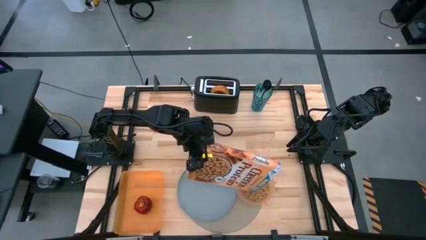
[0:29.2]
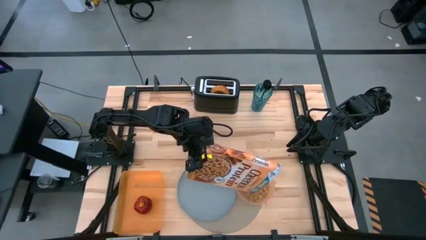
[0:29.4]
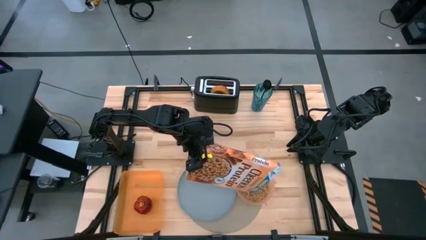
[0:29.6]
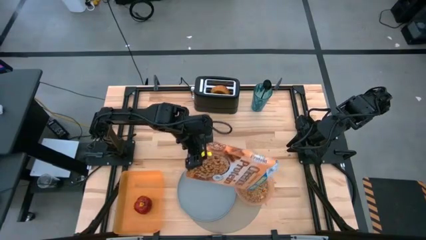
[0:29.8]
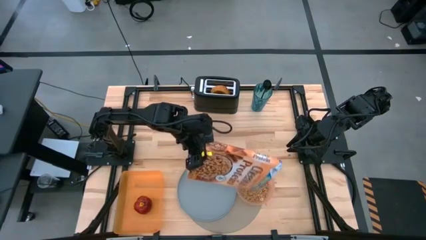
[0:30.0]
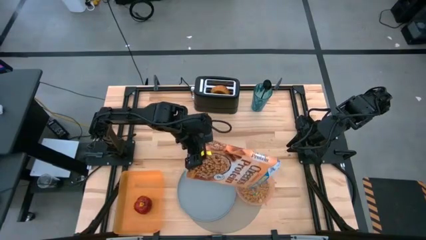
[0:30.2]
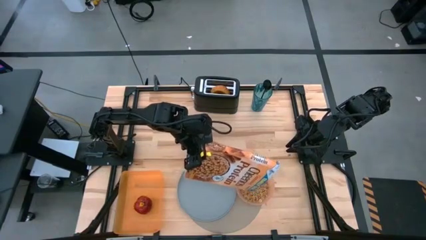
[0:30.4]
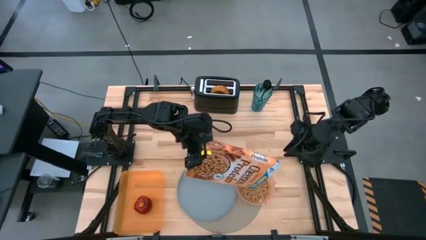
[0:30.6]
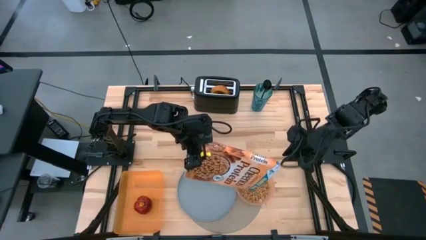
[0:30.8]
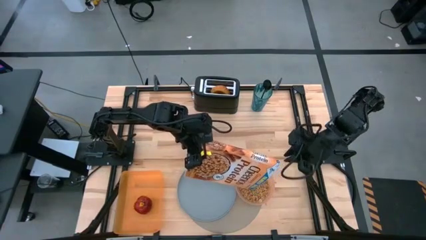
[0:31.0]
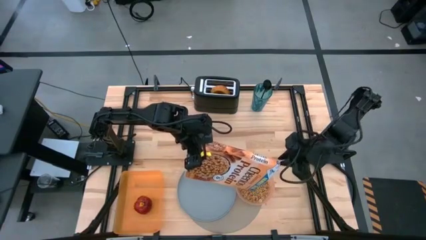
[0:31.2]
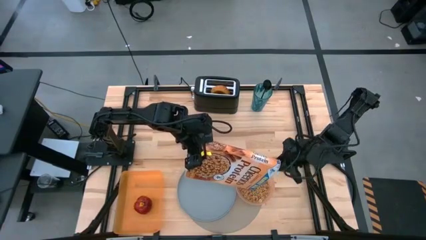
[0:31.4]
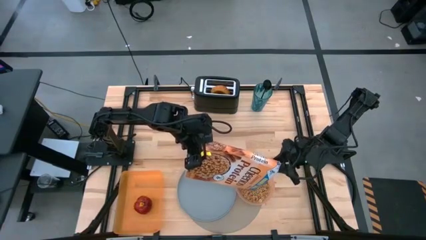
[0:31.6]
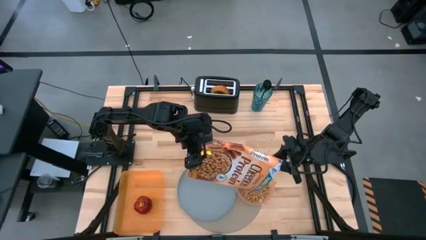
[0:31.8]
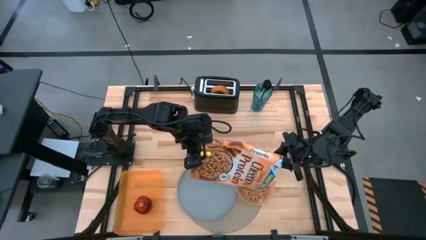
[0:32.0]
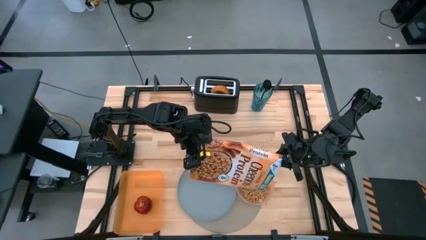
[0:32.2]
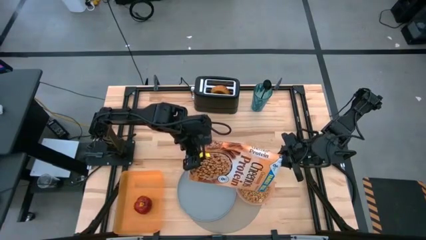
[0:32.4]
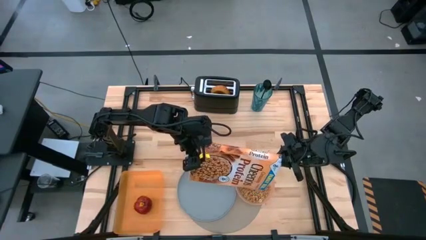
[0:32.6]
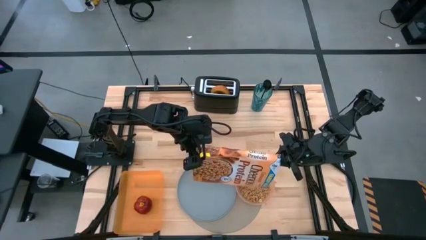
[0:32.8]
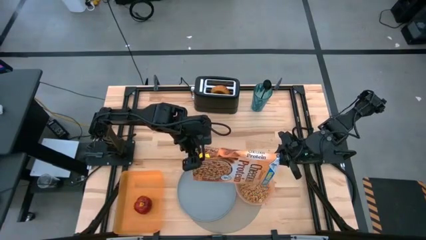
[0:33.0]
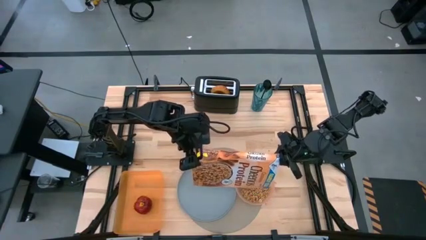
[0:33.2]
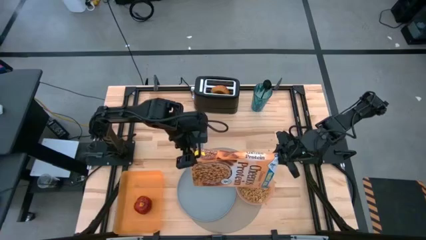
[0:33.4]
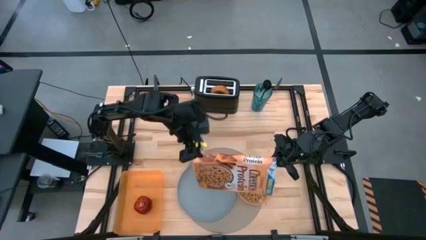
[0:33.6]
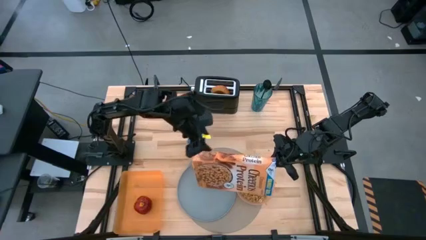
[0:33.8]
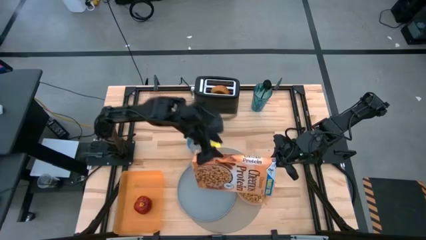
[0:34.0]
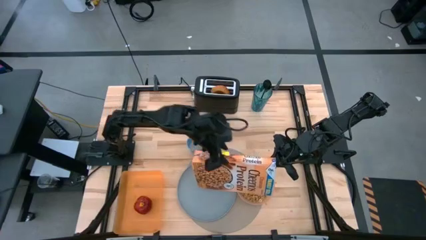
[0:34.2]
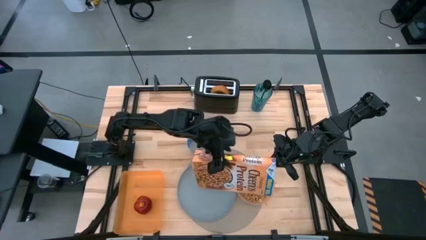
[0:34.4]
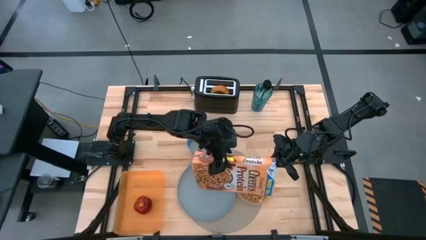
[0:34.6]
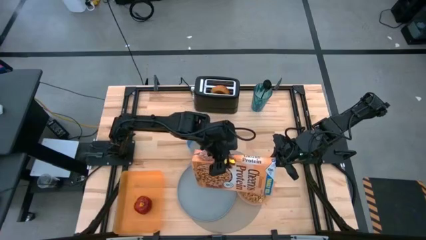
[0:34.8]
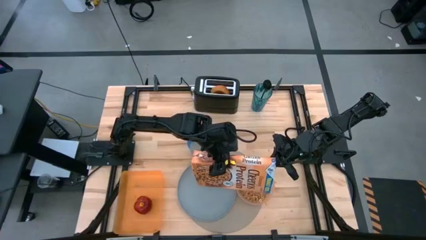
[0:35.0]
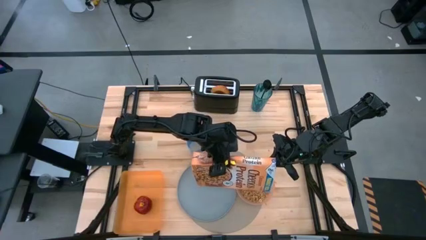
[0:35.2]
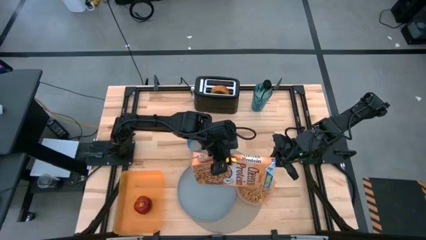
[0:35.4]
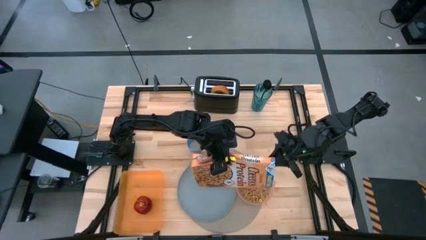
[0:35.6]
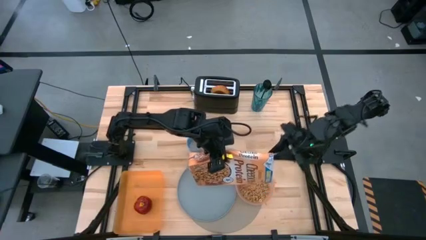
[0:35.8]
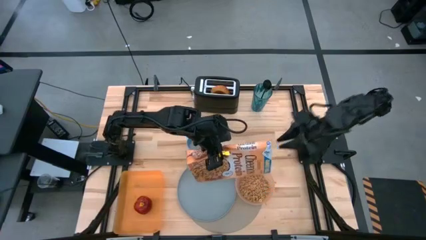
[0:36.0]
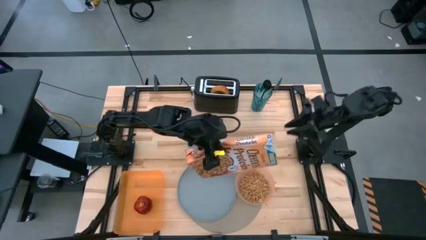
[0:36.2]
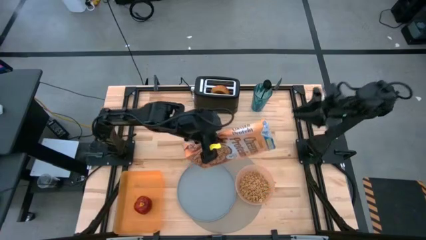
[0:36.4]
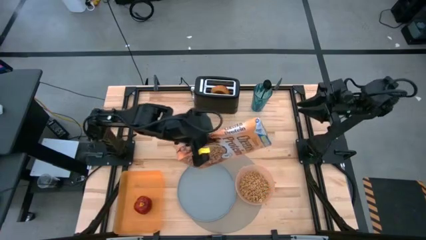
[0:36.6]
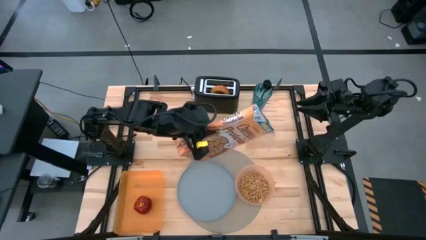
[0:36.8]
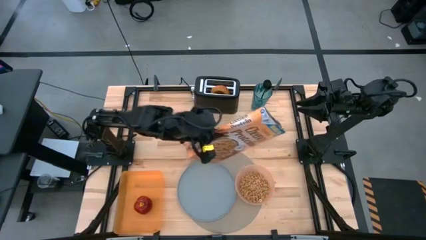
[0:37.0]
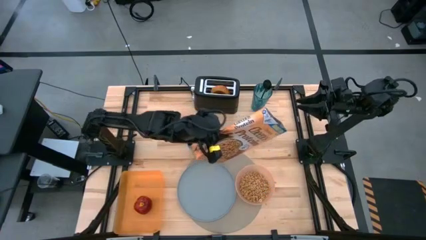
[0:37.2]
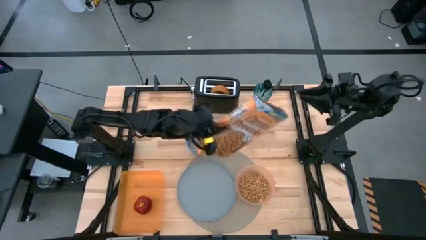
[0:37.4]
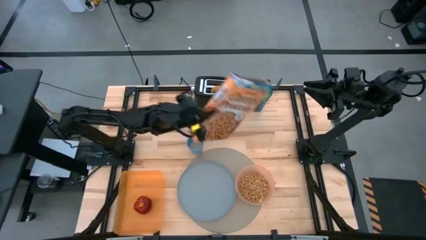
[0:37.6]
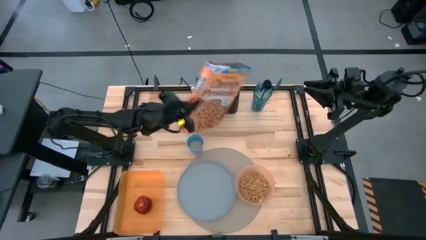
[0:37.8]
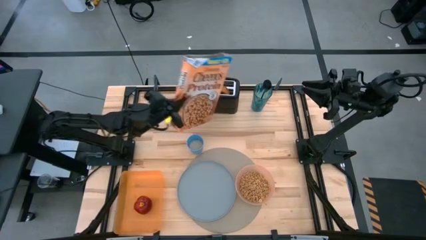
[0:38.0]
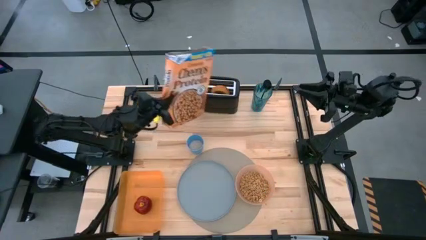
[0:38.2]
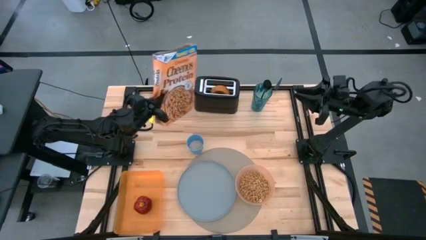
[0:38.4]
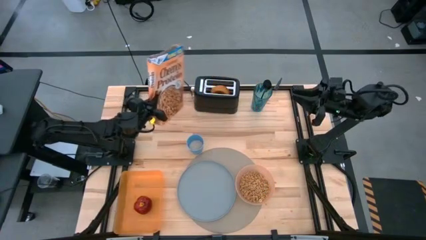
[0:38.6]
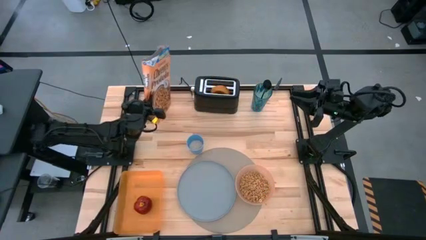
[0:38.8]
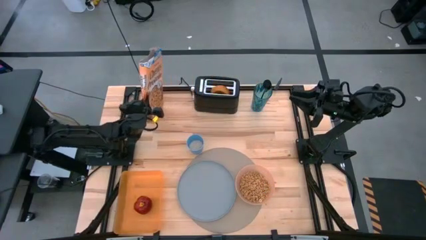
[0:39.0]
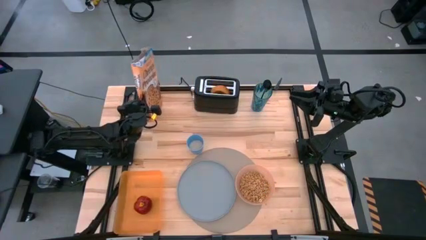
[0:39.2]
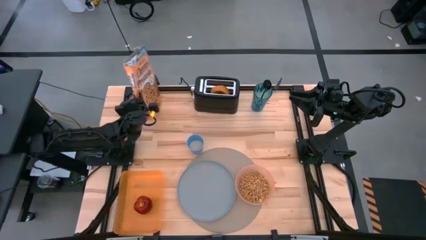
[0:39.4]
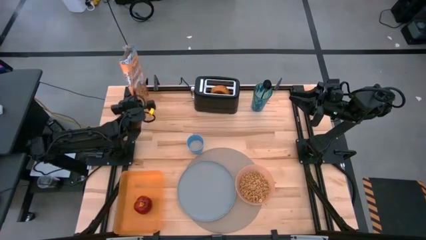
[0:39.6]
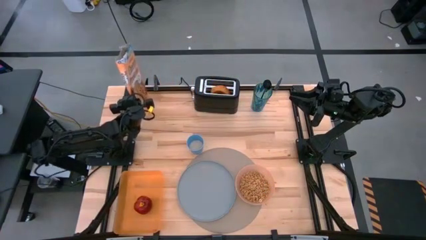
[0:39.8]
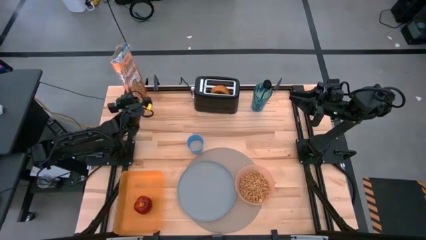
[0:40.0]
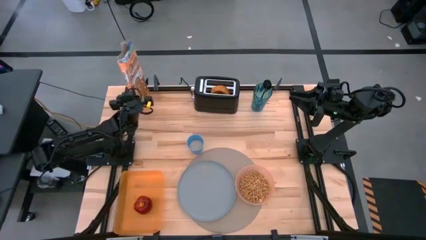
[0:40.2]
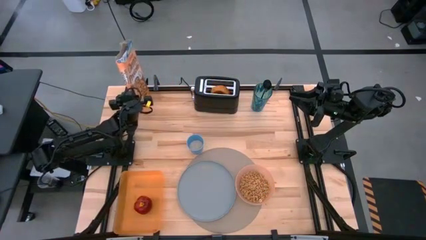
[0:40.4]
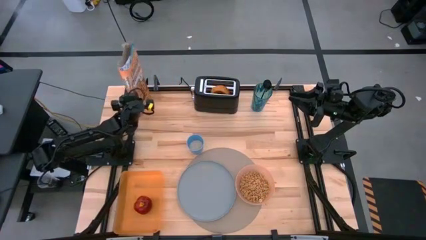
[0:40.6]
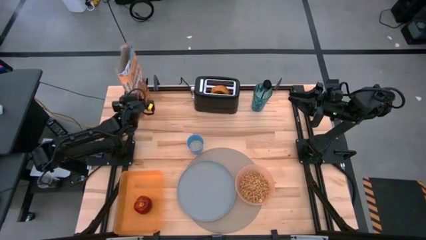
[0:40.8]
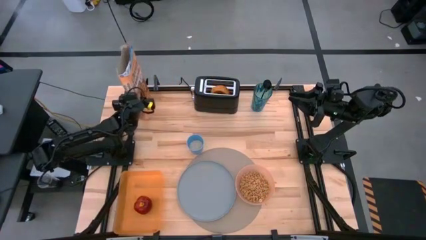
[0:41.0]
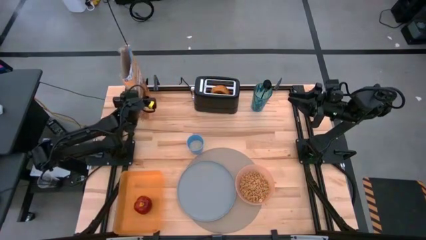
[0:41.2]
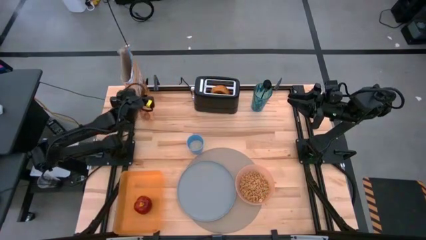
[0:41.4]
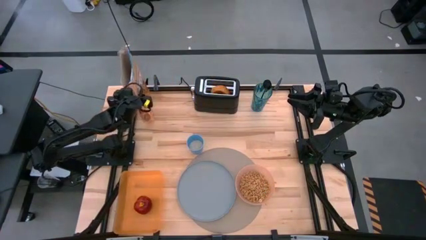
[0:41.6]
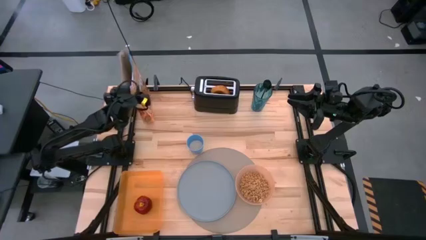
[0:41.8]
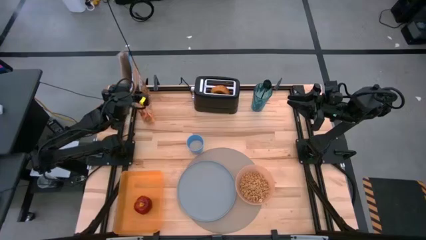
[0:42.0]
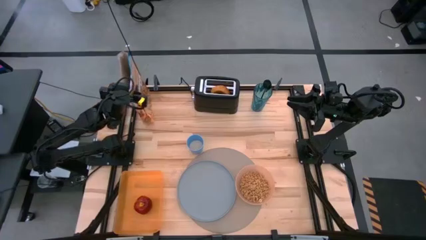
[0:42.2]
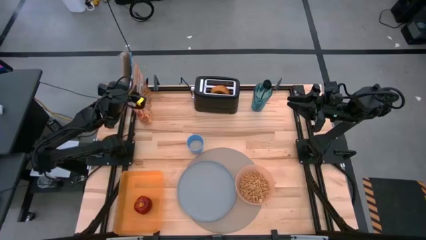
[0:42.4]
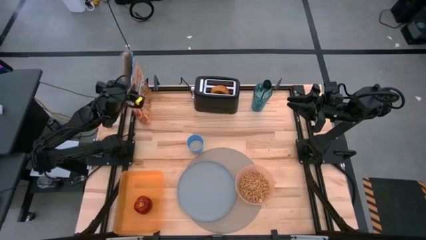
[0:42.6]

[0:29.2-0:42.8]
Task: Arrange a breakfast setting
Pour the cereal from the cereal box into the orange bowl
